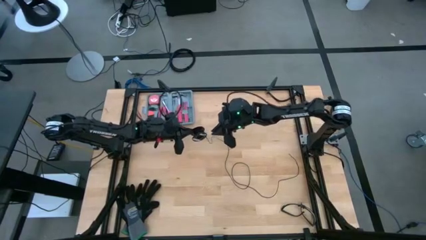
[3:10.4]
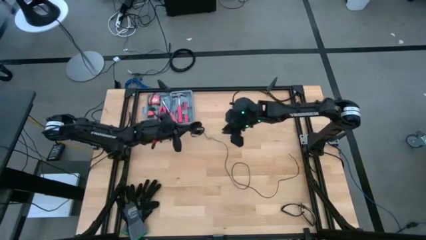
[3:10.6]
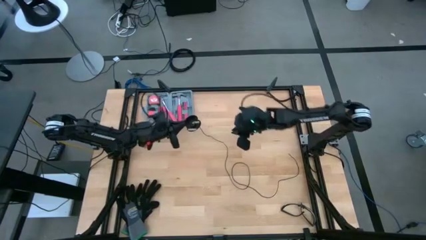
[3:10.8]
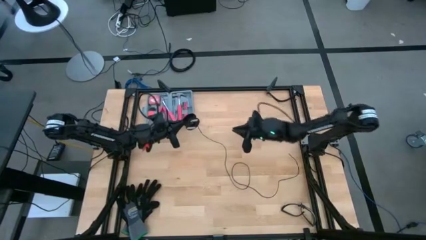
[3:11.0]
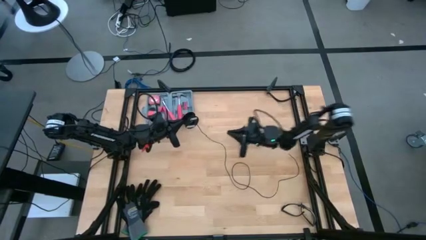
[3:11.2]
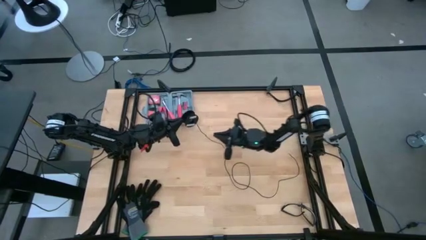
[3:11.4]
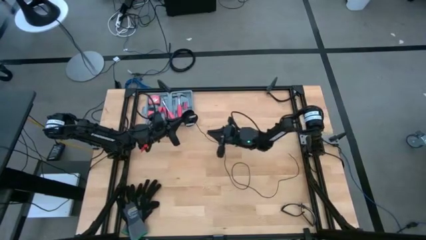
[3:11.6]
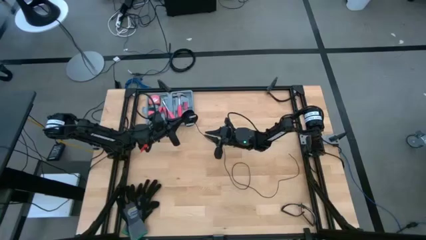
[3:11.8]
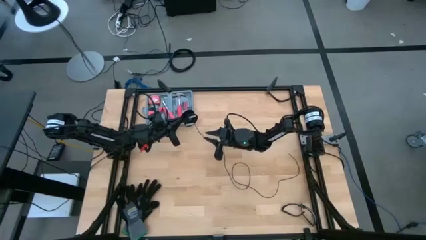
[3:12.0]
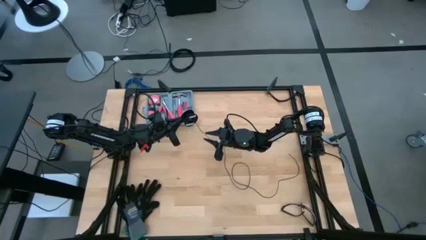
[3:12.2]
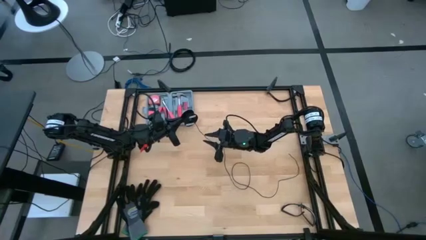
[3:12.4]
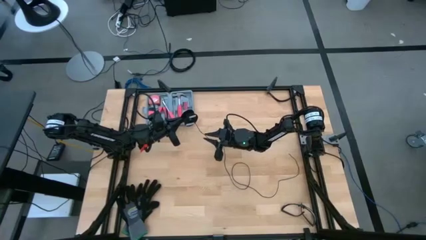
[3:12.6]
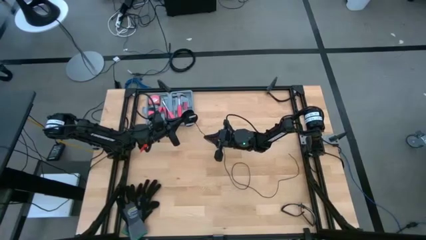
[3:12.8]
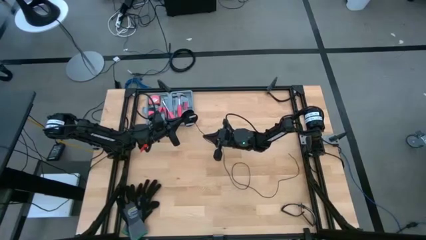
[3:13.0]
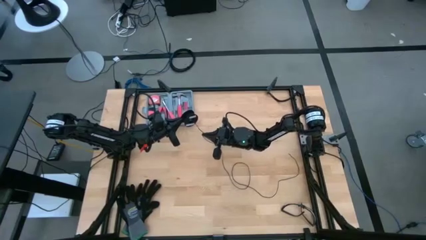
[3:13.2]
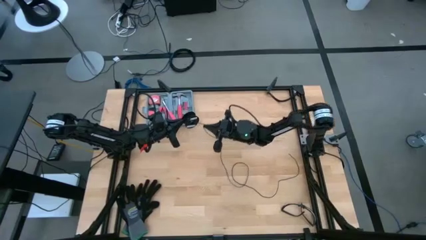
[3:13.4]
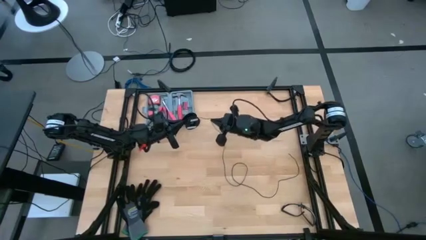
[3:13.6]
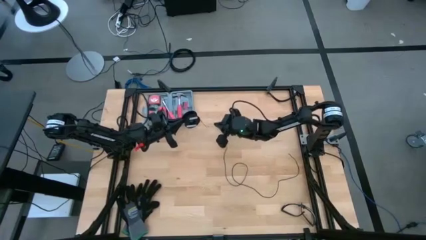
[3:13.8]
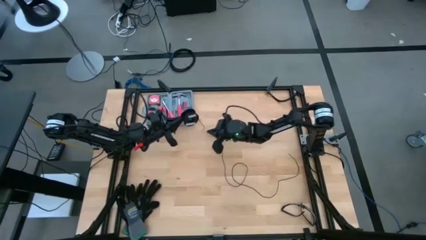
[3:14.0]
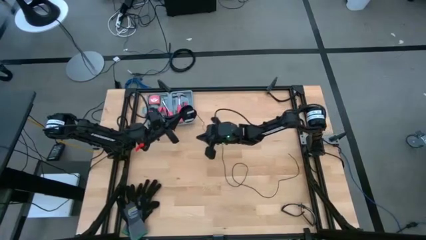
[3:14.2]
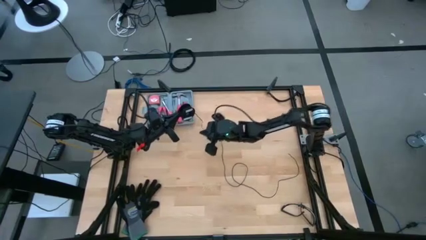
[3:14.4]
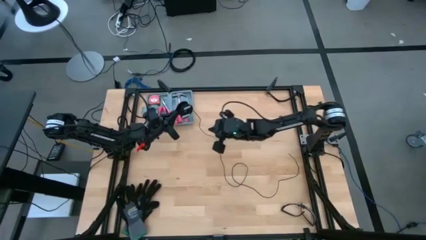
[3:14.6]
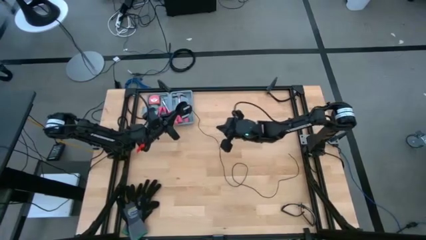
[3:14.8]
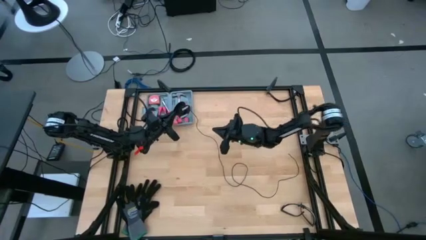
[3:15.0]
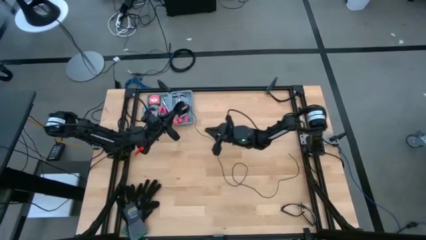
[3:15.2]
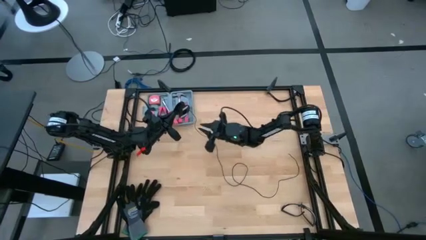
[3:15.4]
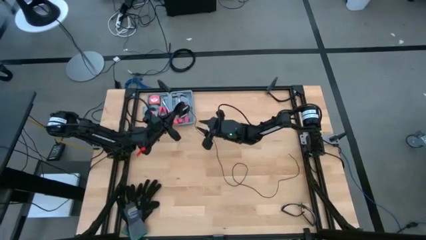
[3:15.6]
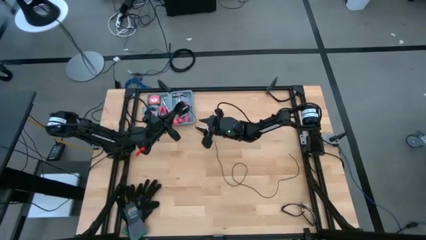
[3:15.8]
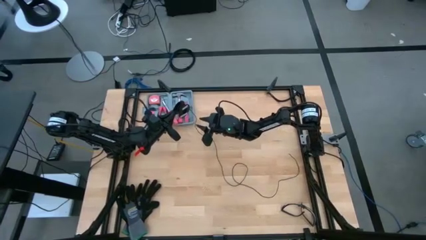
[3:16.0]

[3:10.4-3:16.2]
Task: Coil cords
Coil the black wire onto the spool

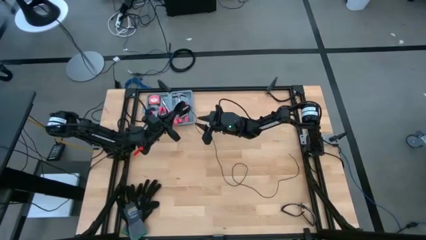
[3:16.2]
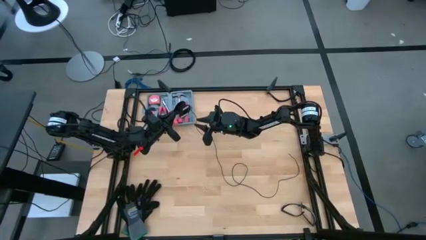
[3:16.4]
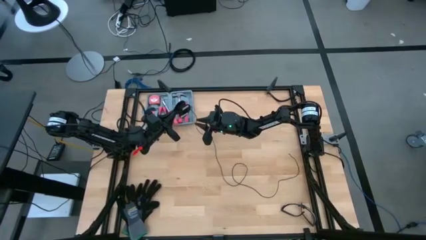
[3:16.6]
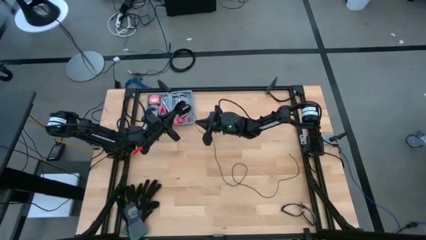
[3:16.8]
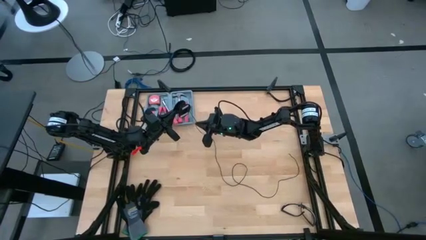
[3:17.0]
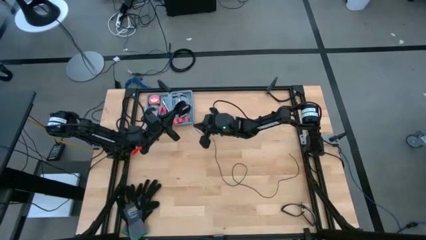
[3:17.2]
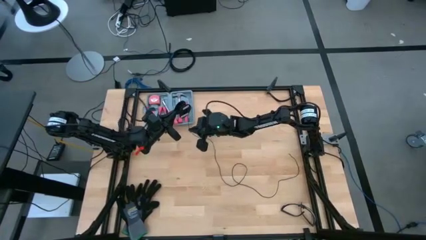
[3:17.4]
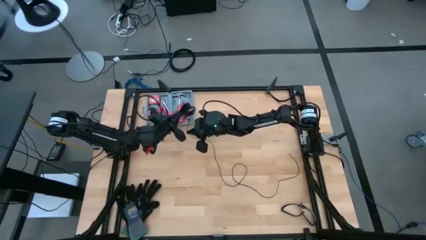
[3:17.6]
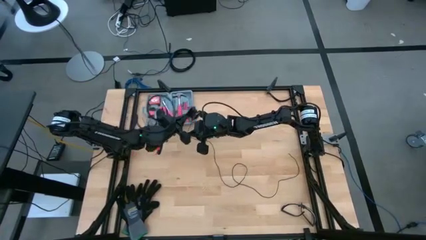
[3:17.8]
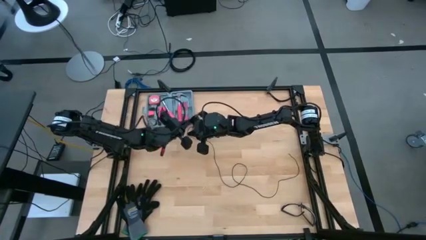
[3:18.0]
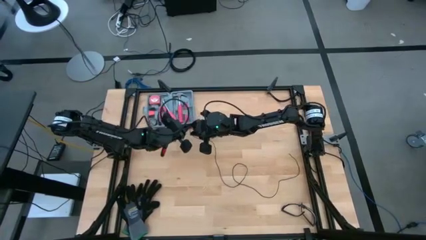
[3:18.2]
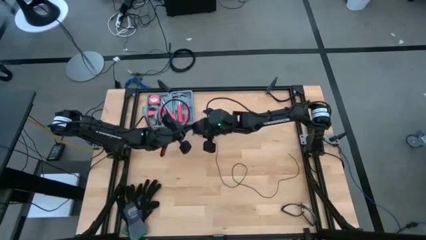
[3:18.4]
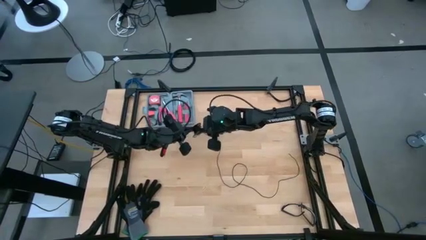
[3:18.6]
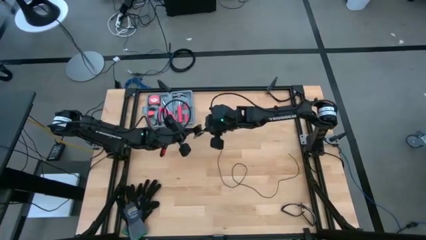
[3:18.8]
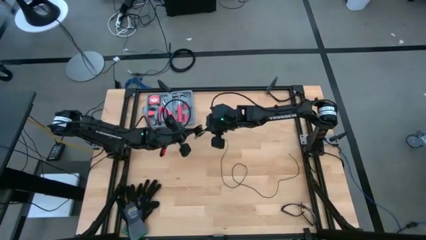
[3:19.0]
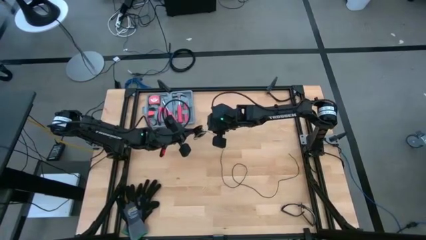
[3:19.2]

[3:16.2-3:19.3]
Coil the black wire onto the spool

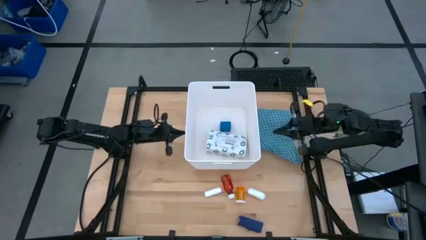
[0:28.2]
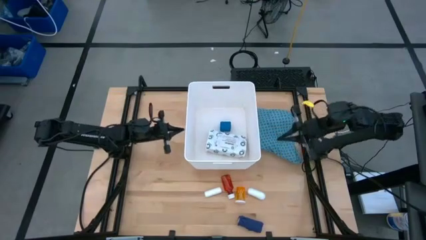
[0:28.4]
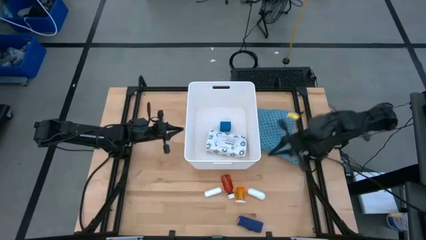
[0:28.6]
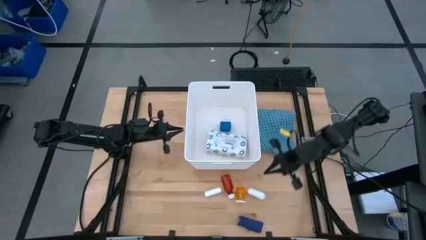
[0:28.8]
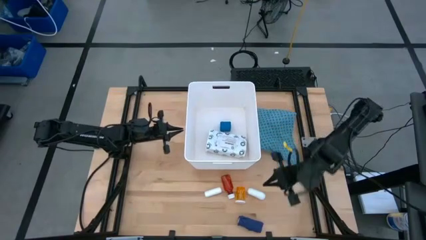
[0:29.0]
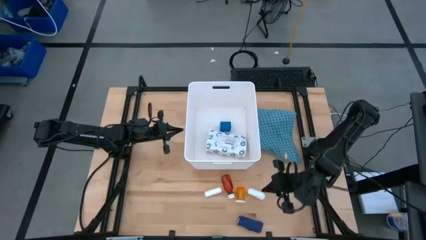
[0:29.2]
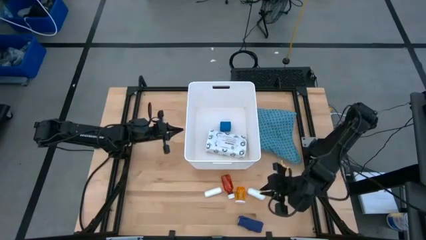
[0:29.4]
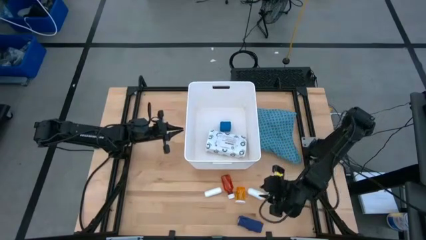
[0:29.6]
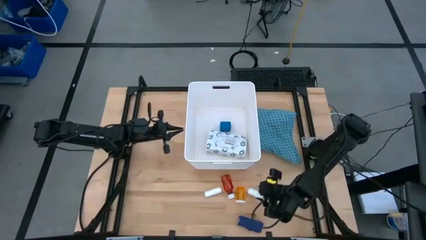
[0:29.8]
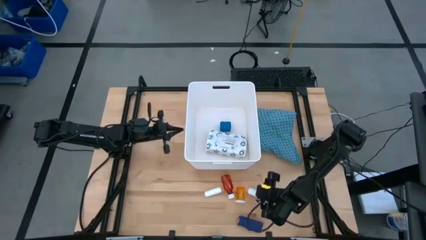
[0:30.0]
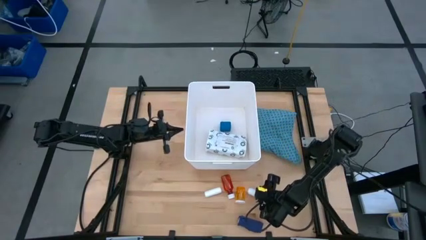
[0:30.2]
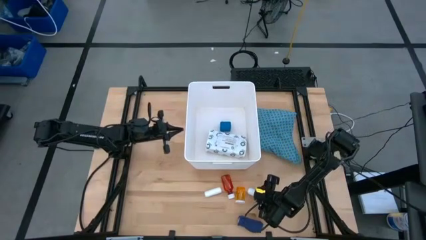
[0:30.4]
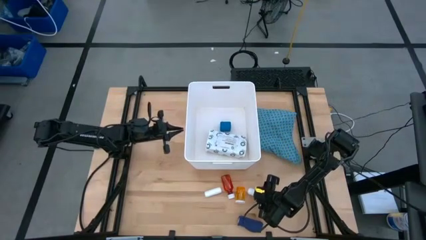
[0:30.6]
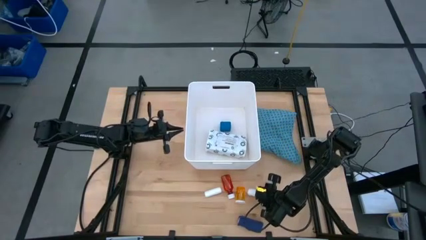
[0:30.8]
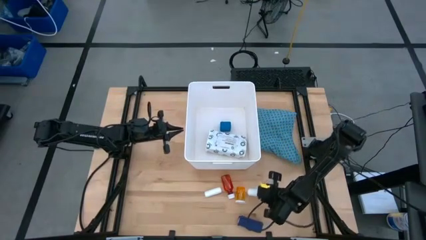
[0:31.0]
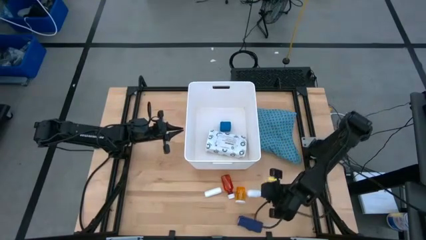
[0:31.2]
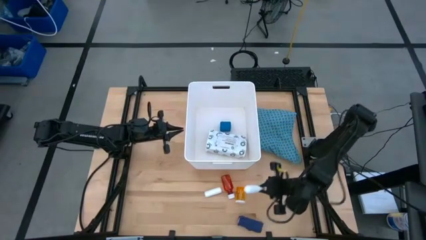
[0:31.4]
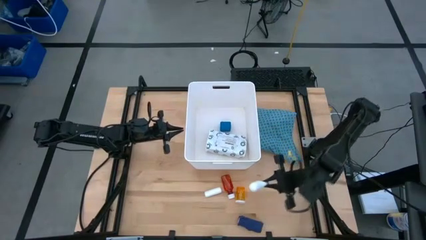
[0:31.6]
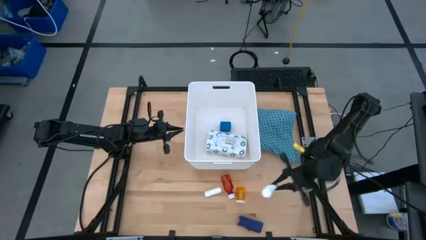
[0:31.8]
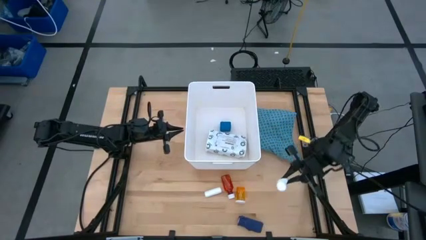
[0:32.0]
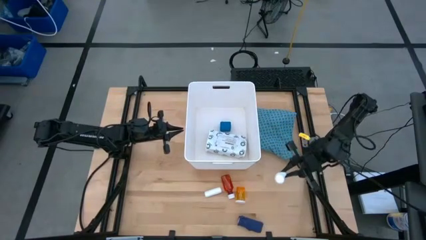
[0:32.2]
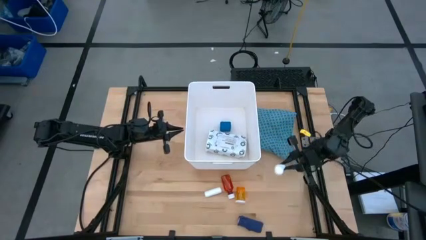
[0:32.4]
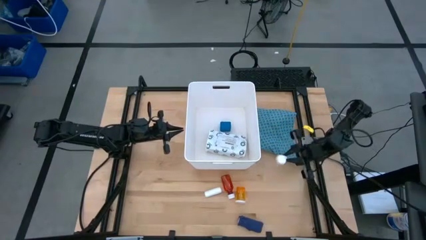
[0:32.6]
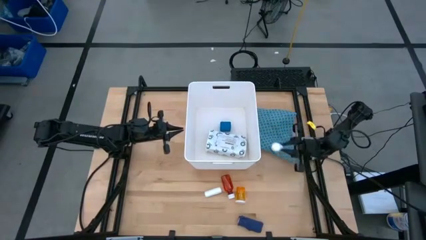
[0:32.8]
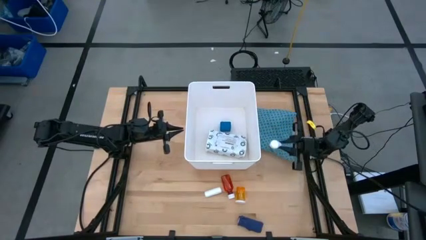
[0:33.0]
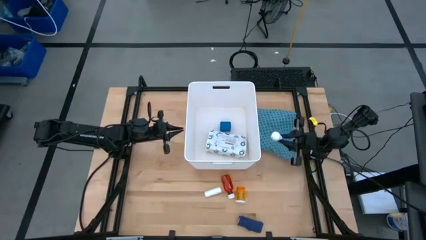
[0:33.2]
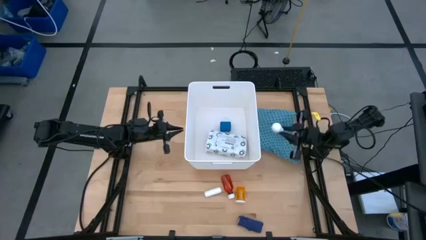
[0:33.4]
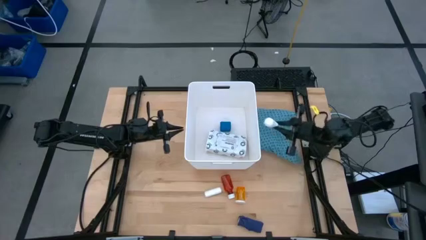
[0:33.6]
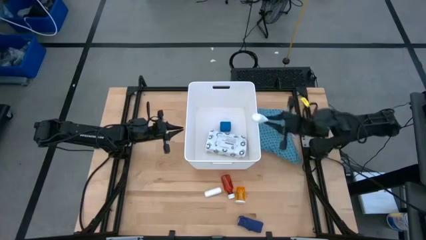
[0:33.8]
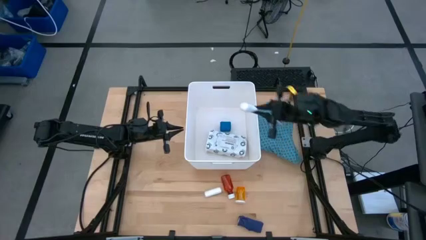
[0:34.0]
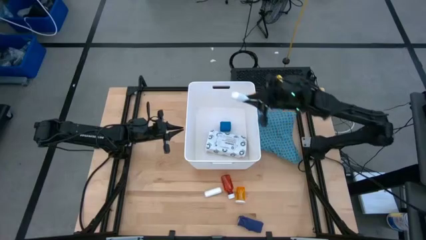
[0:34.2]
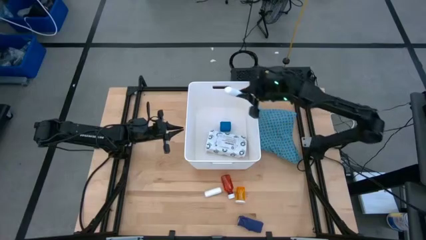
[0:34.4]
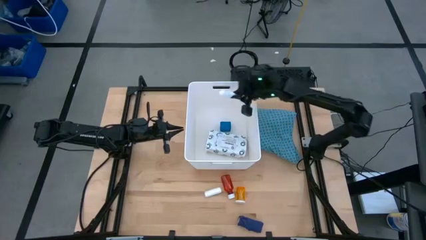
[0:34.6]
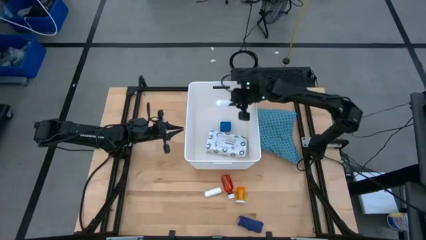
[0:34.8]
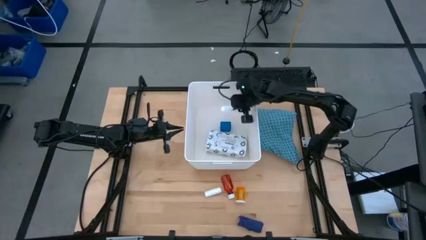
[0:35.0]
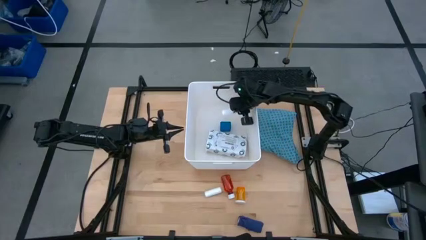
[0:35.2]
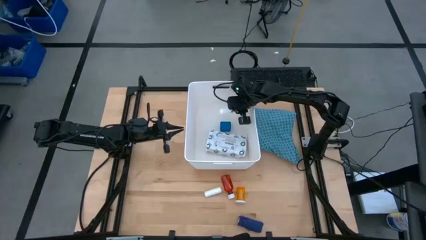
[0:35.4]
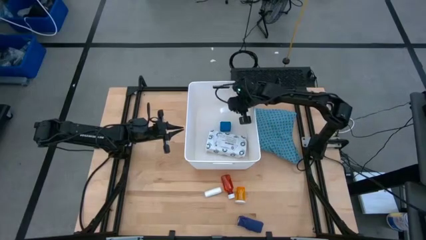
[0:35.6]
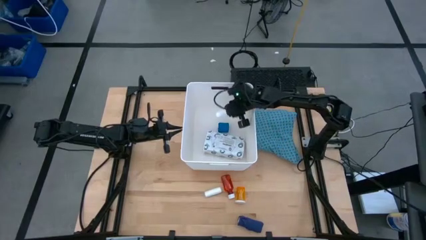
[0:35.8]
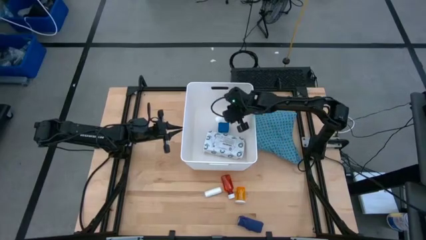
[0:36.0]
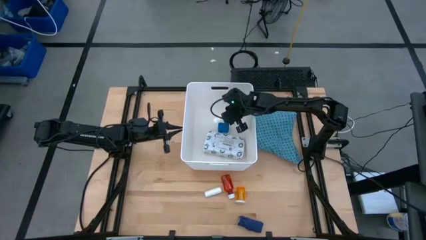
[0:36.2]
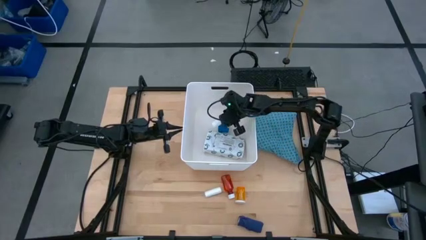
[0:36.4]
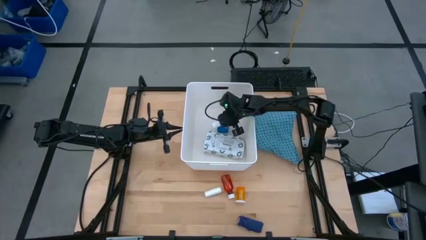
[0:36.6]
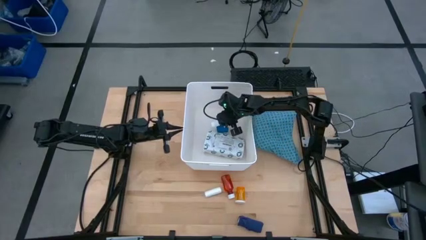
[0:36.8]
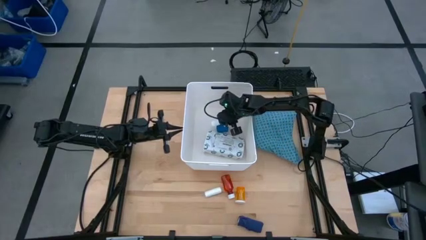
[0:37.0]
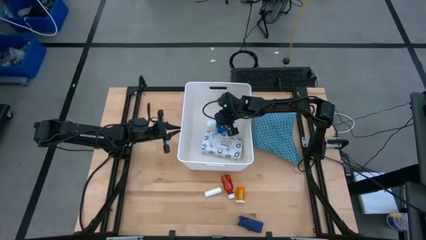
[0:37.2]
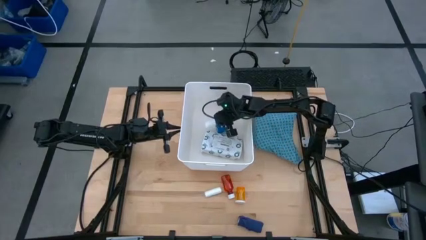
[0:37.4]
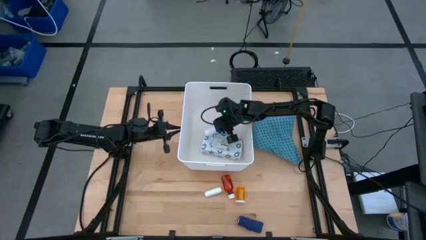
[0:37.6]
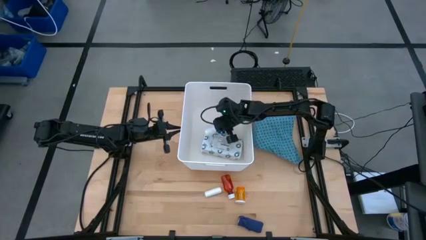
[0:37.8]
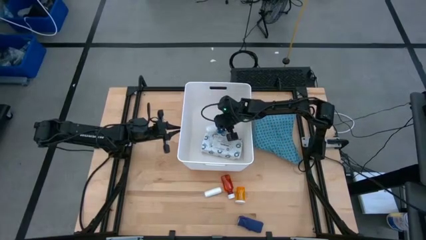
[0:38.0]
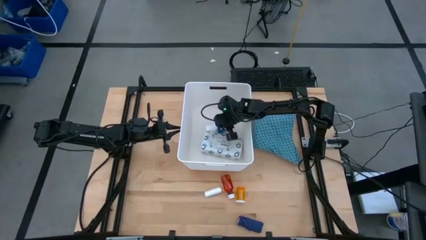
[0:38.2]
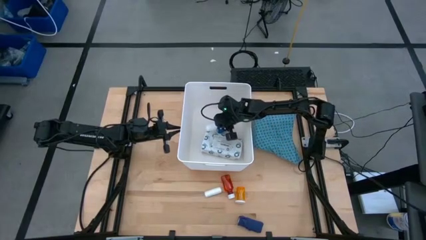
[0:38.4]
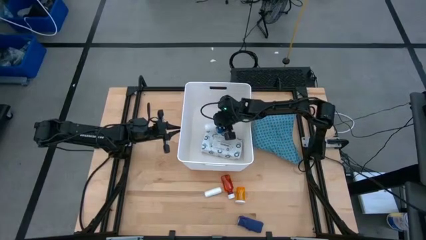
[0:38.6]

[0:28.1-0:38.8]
Task: Pick & place medical supplies in basket/bin
Put the right white rolled gauze into the white bin
